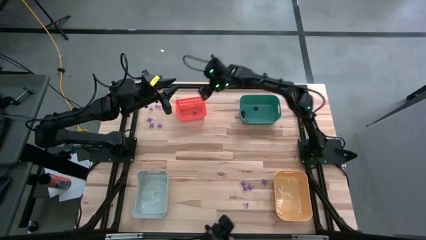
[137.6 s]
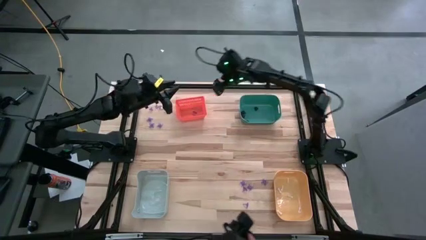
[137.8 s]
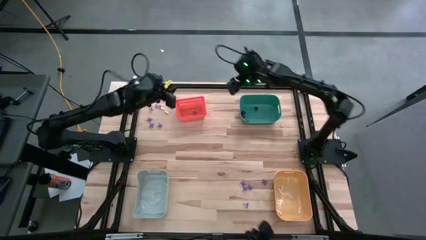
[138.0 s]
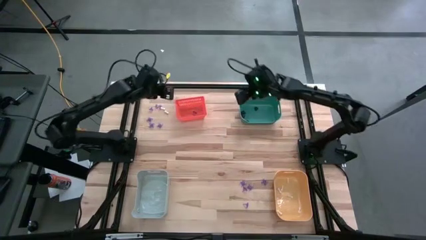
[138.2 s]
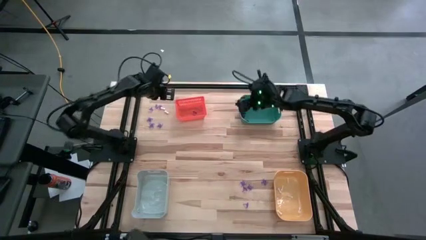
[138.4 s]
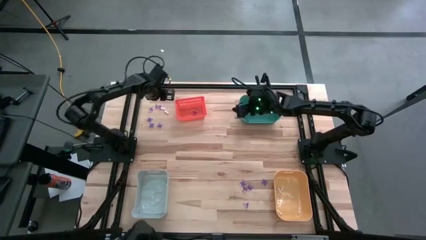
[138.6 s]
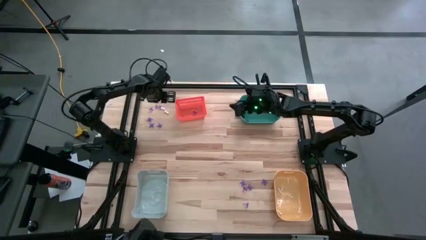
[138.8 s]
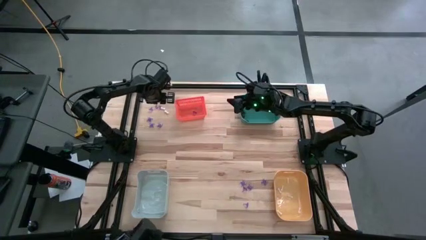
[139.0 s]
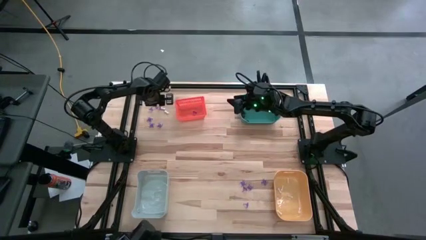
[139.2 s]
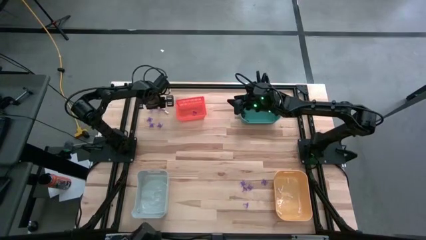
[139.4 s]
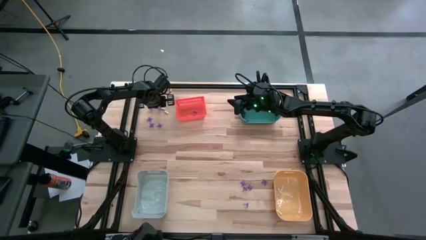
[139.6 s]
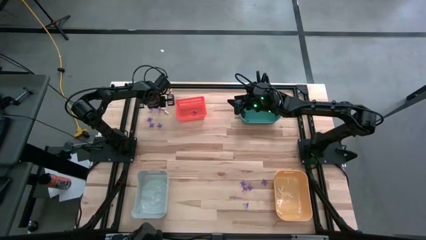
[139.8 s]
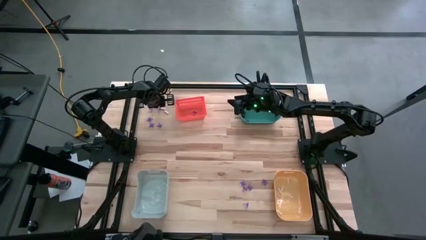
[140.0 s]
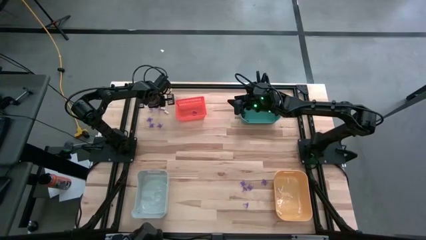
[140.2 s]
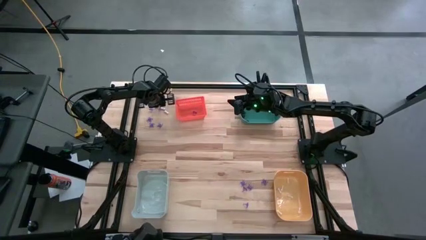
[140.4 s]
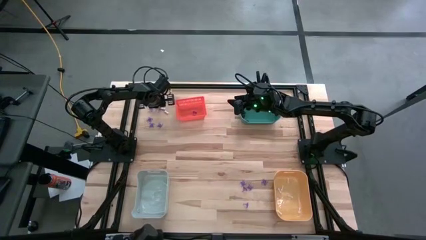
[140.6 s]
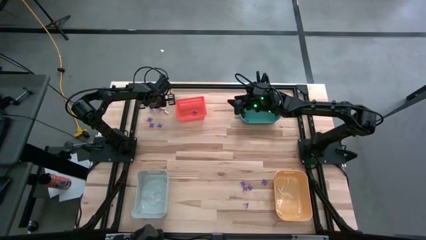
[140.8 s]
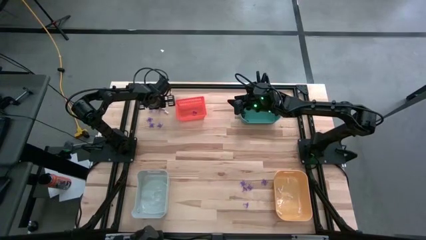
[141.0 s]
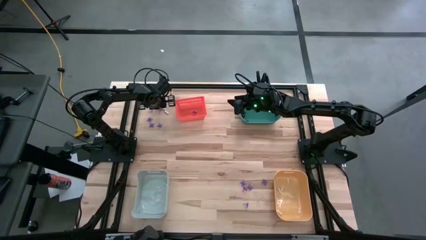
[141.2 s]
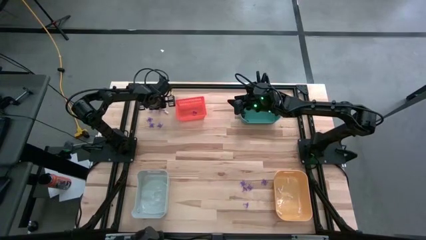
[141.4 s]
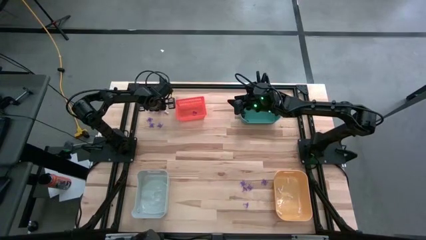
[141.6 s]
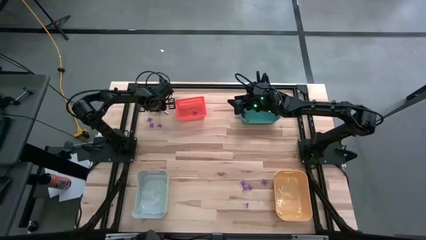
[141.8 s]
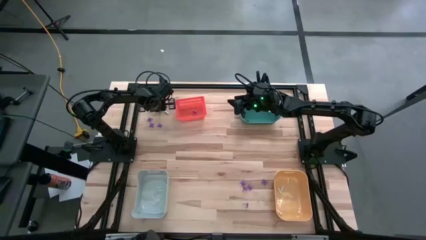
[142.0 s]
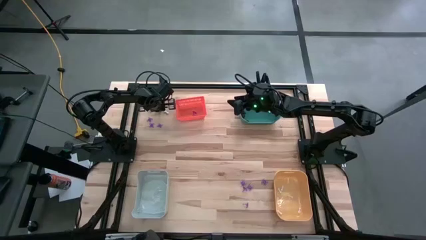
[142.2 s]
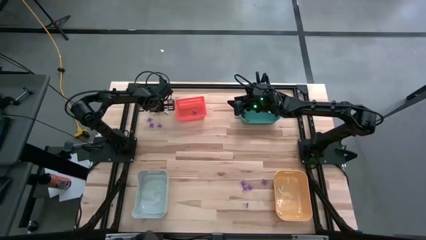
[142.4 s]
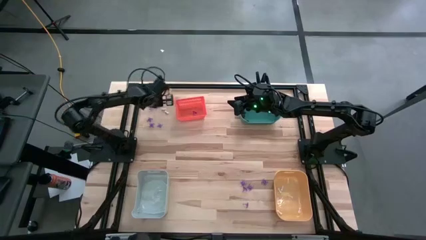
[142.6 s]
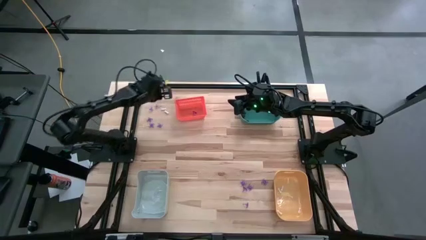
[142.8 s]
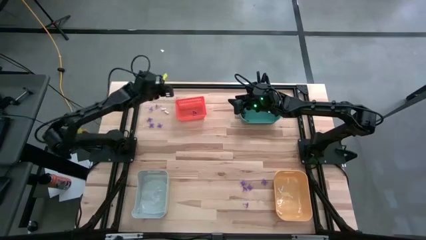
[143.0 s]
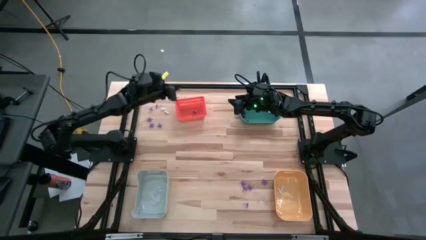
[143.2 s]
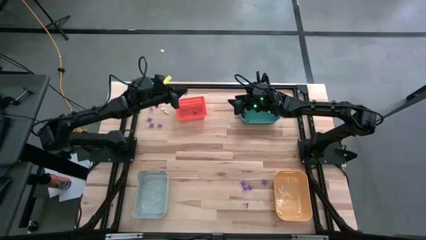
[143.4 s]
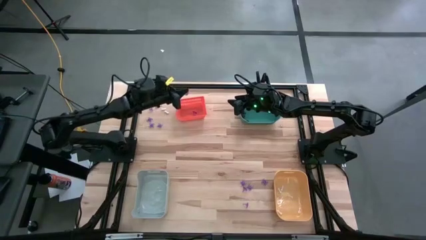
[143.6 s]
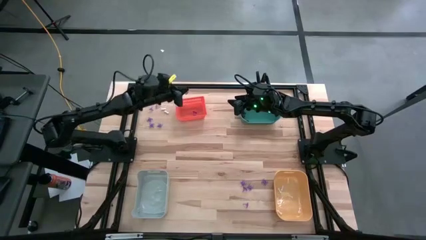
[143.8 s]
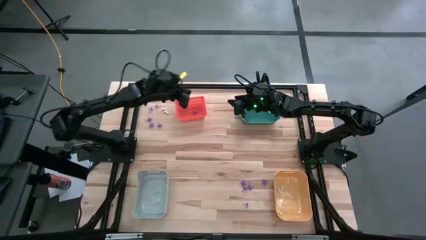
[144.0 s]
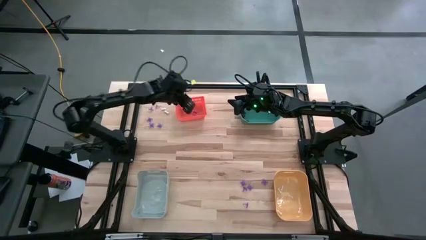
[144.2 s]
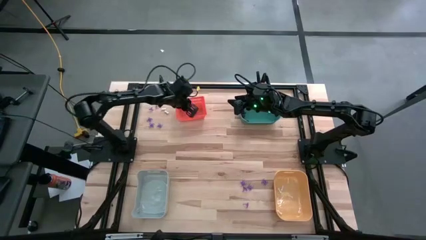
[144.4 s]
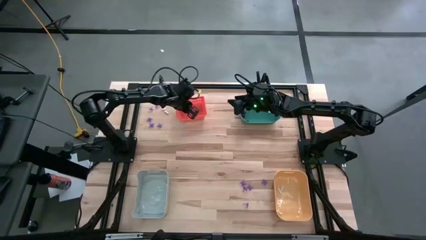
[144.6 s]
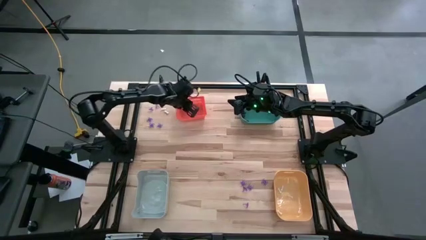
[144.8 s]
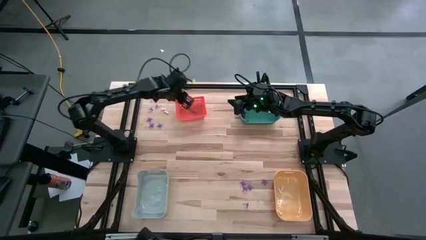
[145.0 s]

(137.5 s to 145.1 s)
Task: Sort Halloween decoration
Put the purple witch hat toy into the orange bin

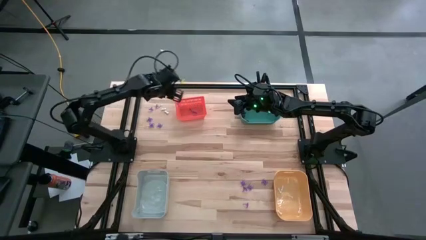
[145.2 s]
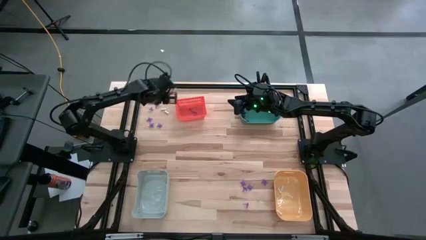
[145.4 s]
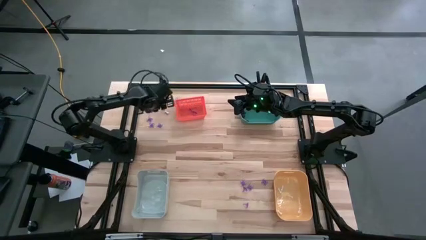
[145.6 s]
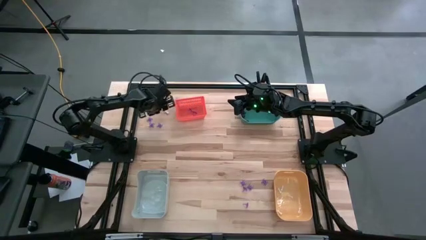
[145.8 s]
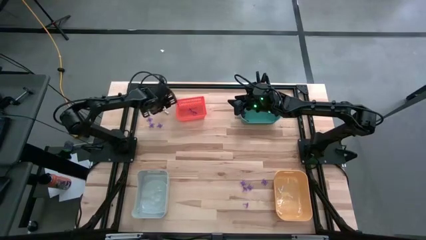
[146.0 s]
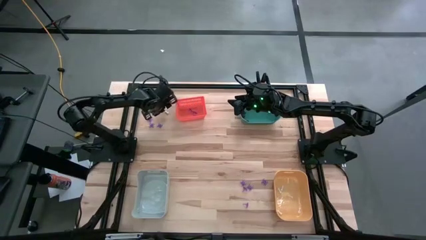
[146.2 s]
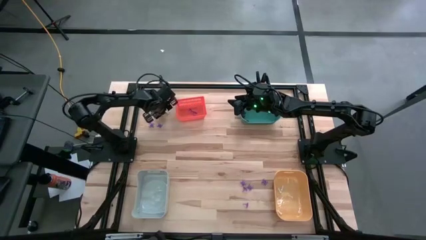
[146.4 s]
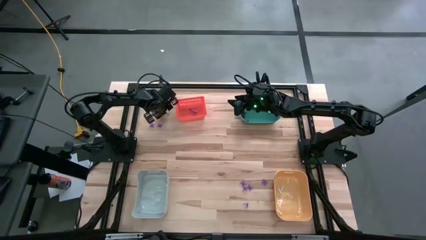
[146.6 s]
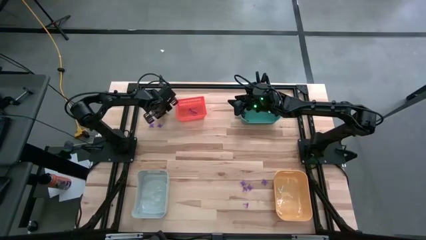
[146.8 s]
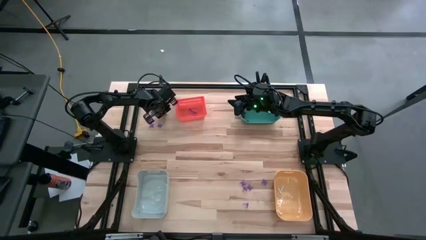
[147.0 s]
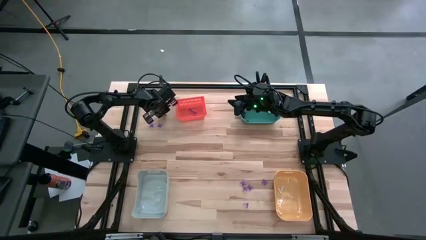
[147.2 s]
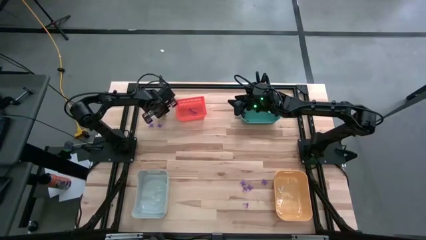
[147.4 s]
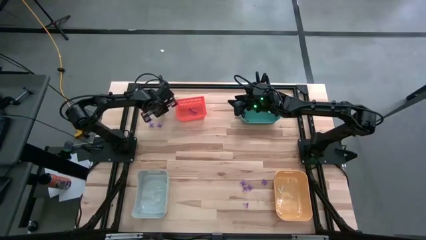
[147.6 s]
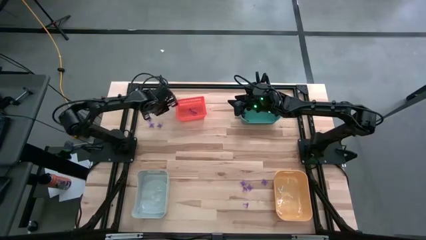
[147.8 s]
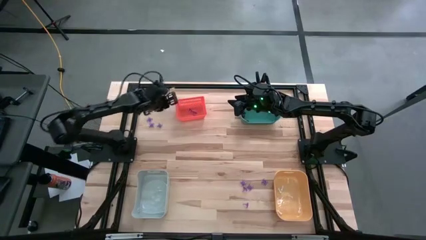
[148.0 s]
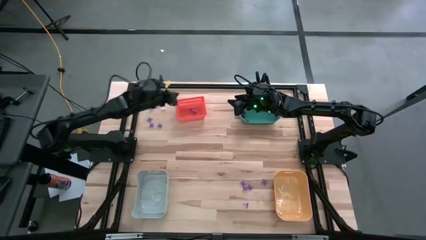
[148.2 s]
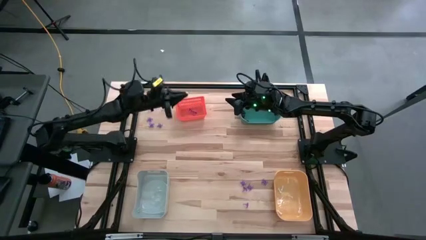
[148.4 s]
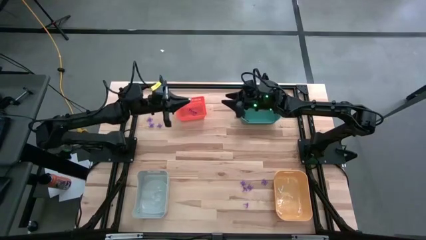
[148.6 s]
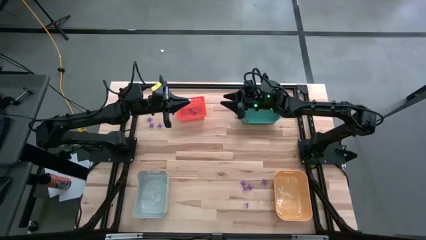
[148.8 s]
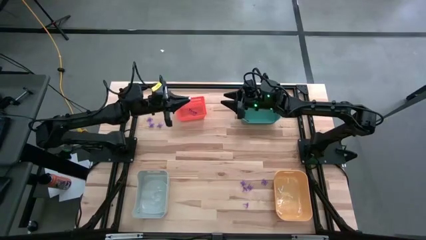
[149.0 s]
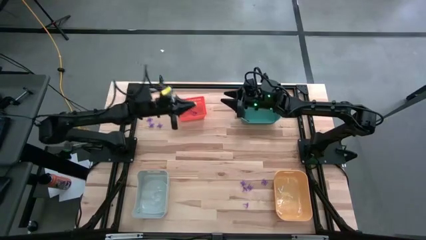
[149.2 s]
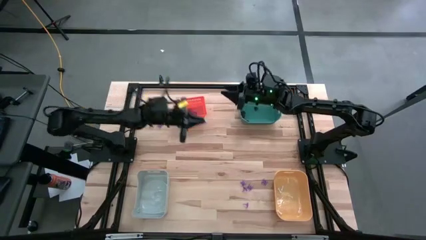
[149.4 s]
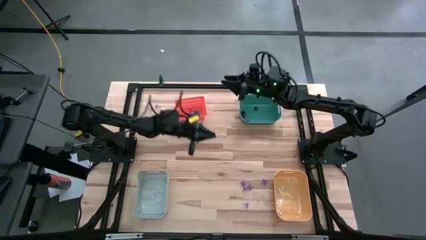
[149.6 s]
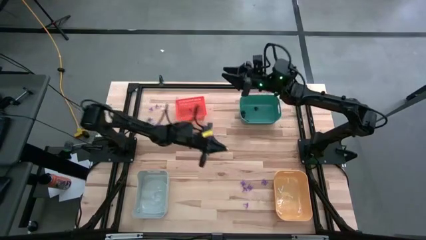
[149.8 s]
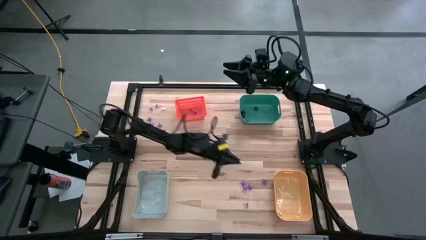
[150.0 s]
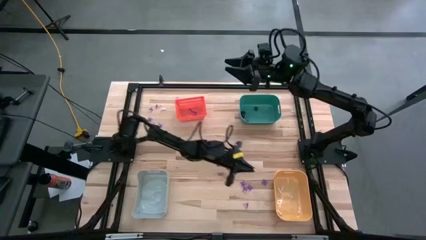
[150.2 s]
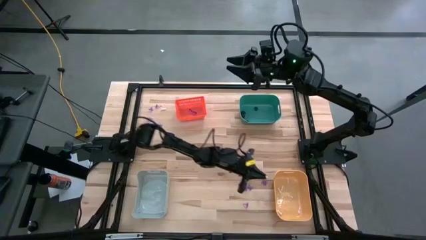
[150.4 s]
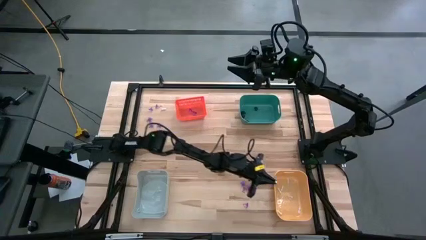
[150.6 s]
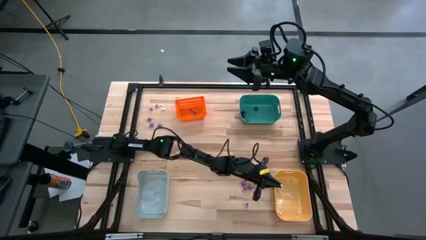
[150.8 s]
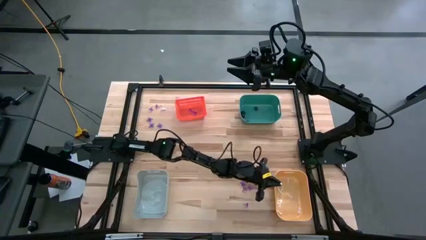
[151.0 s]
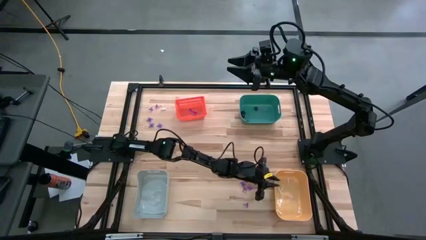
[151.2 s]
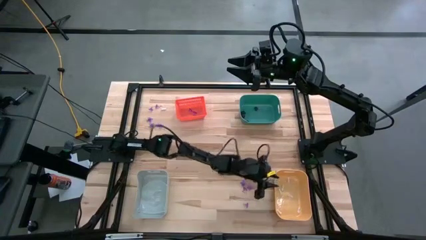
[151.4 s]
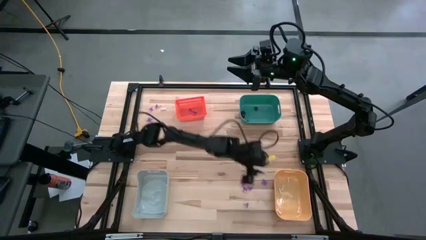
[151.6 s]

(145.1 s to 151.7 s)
Put the white bone toy into the yellow bin

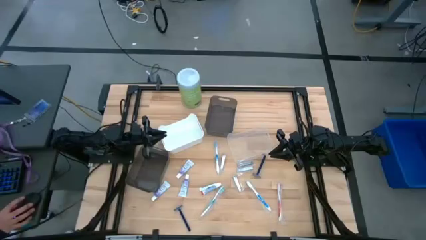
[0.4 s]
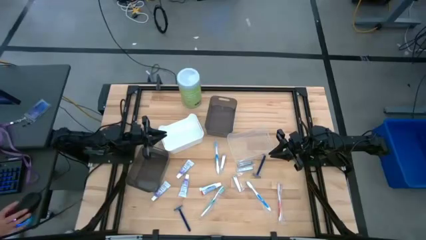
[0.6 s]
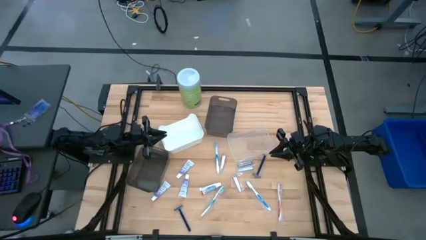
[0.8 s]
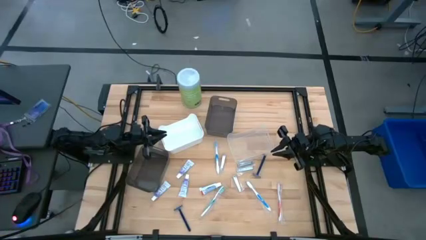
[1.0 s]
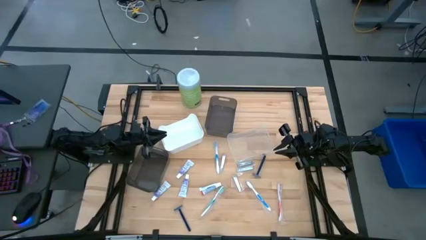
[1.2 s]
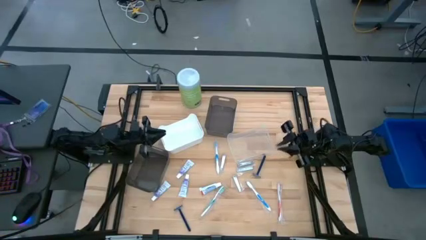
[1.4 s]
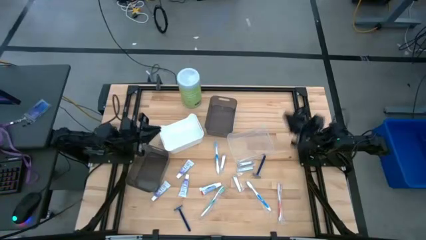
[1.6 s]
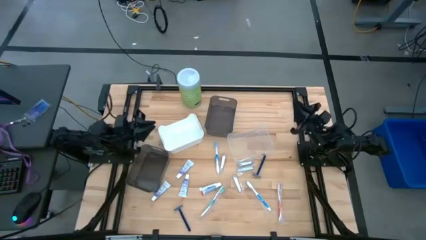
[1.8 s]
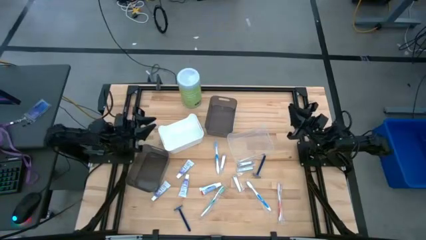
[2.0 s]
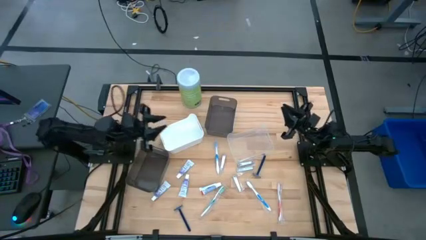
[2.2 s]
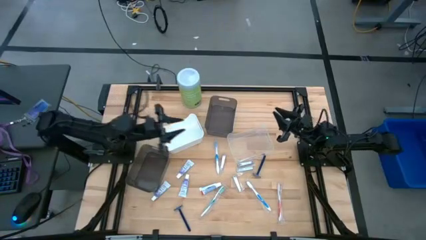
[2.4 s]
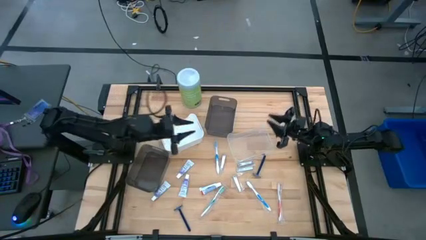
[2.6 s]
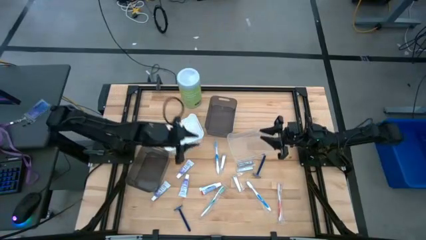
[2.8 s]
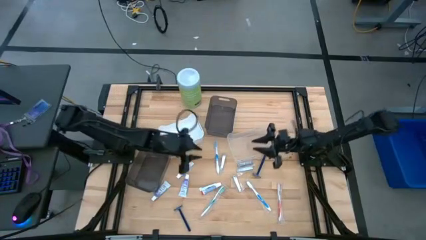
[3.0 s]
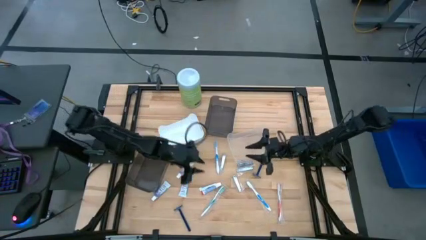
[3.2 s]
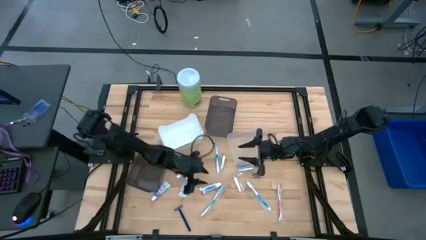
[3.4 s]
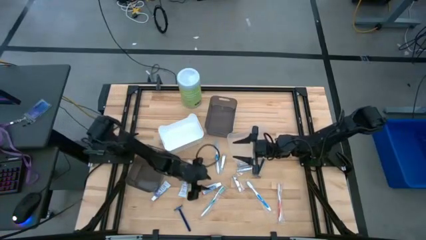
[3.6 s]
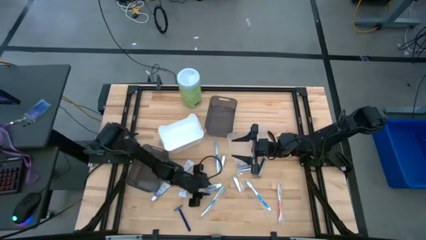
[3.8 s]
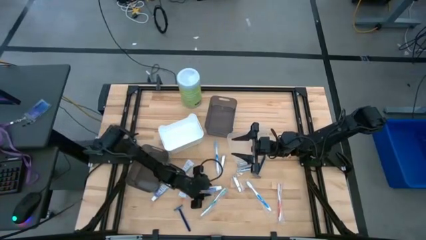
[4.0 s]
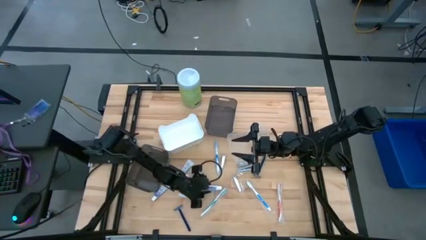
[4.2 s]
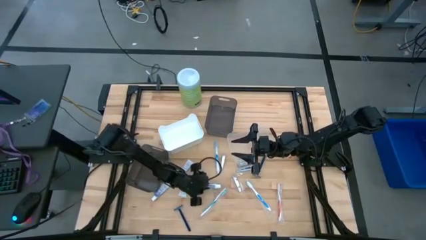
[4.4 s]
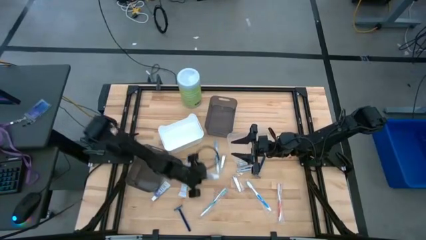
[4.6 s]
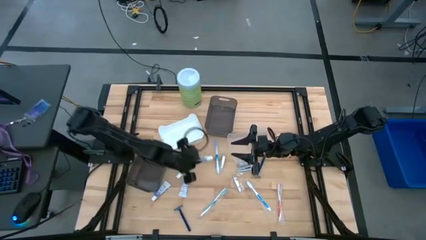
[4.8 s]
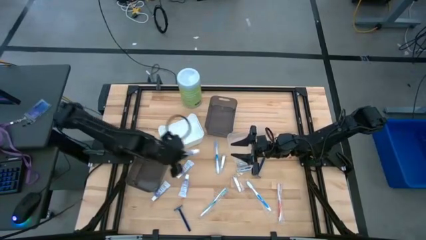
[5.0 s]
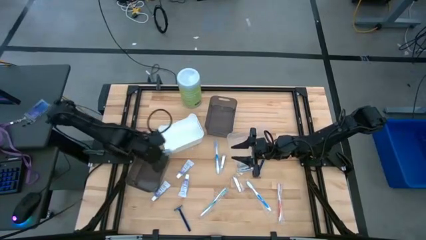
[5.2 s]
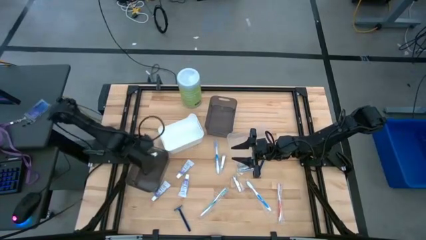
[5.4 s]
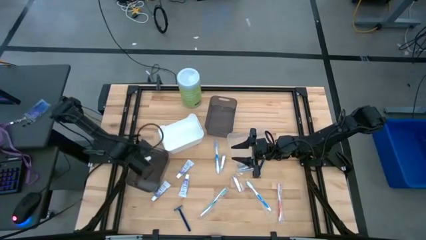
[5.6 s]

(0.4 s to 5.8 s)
Task: Pick & Place Travel size toiletries
Put the purple toothpaste into the bottom black bin
